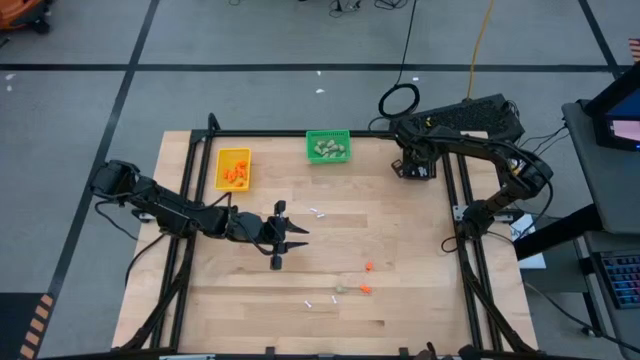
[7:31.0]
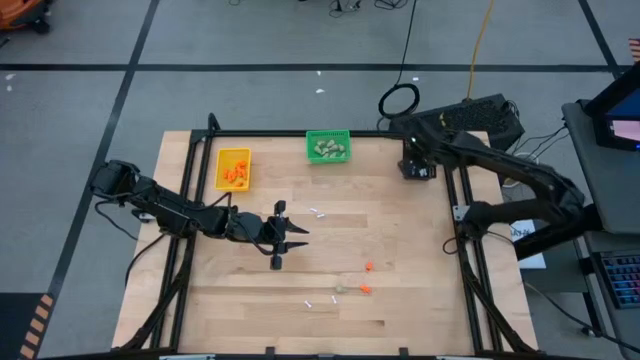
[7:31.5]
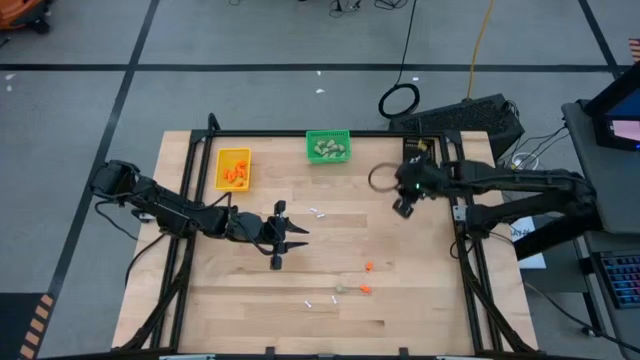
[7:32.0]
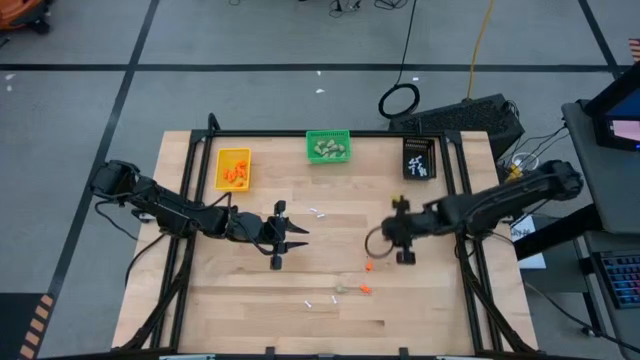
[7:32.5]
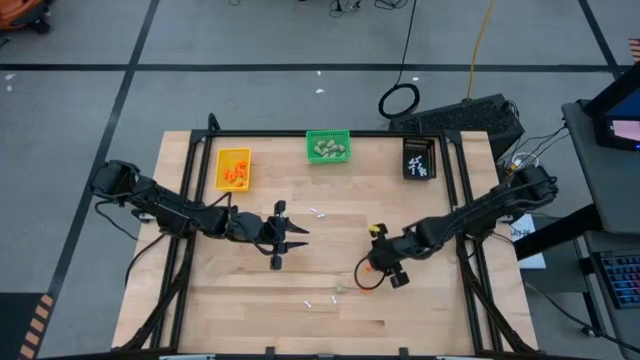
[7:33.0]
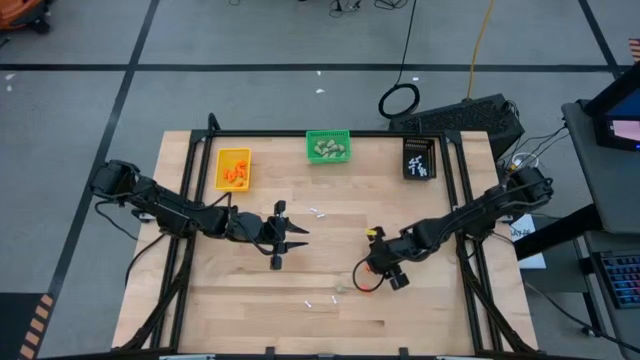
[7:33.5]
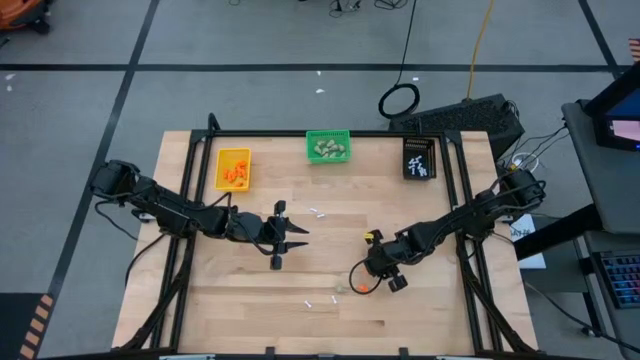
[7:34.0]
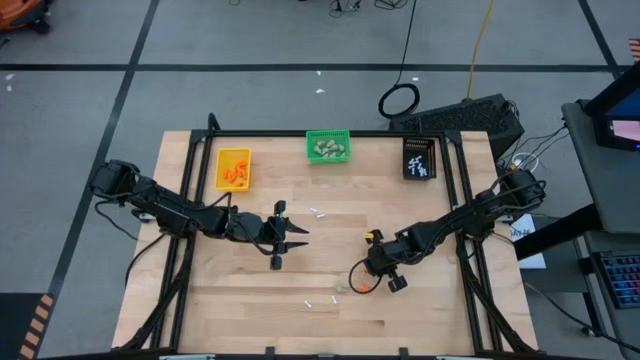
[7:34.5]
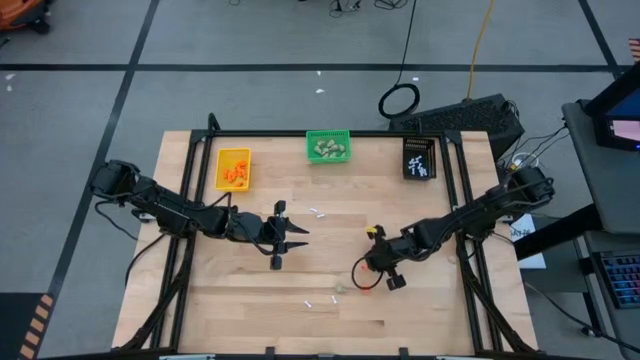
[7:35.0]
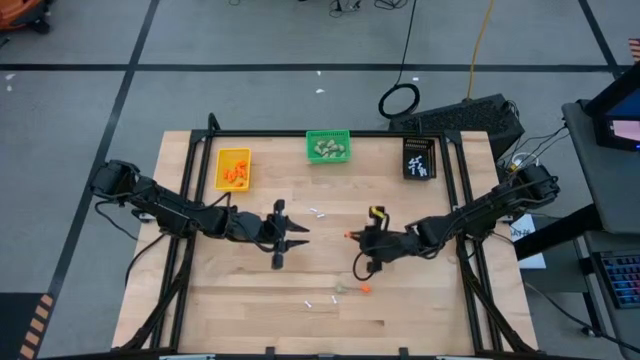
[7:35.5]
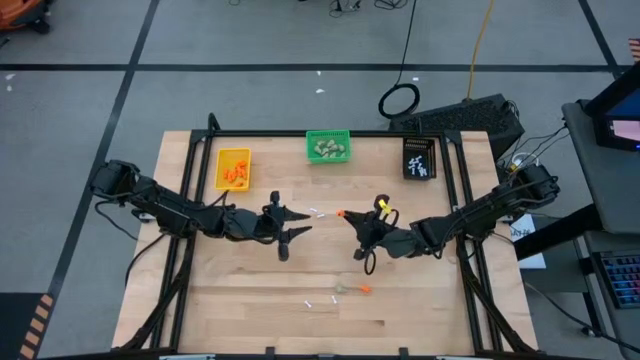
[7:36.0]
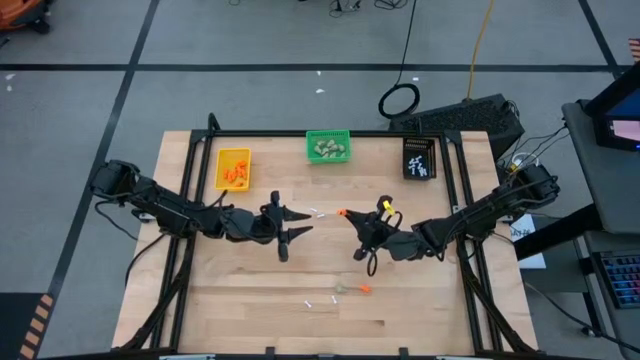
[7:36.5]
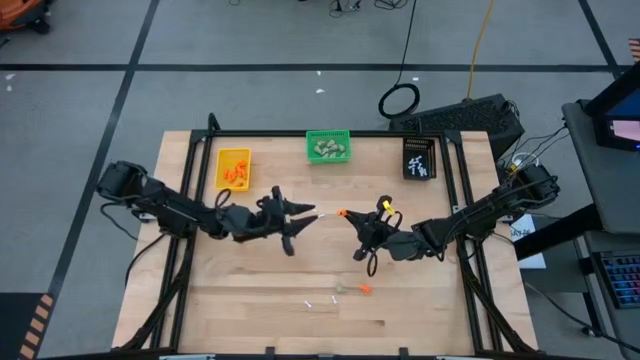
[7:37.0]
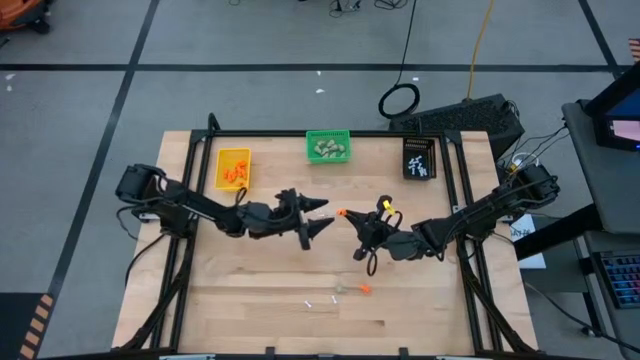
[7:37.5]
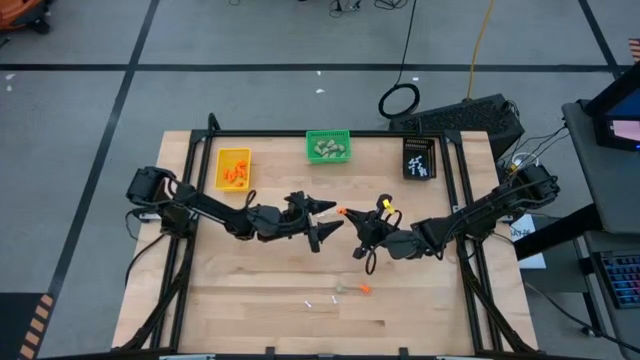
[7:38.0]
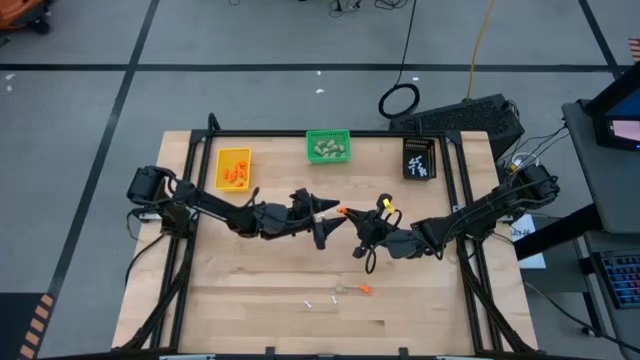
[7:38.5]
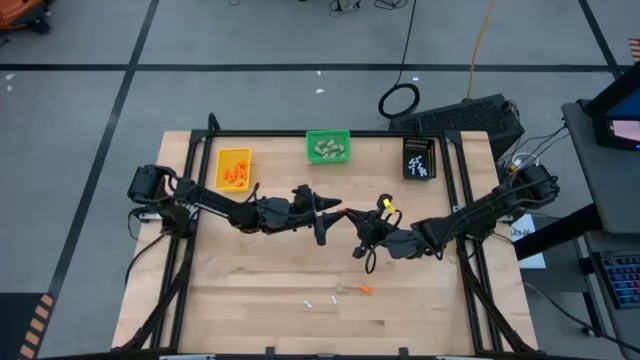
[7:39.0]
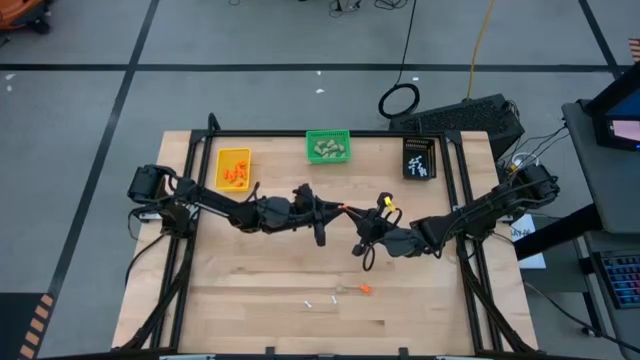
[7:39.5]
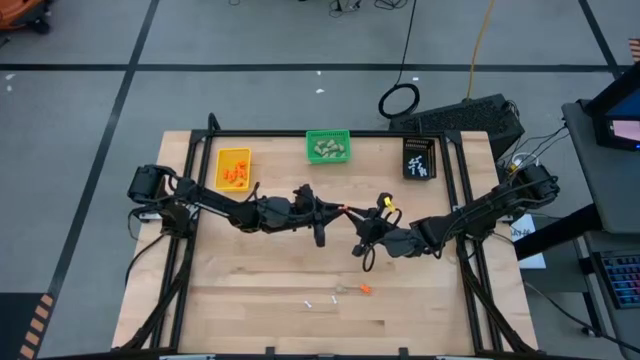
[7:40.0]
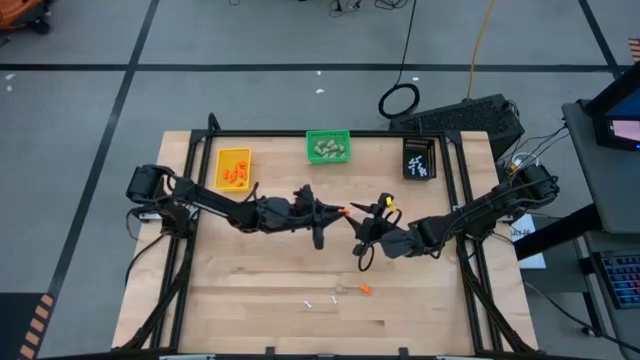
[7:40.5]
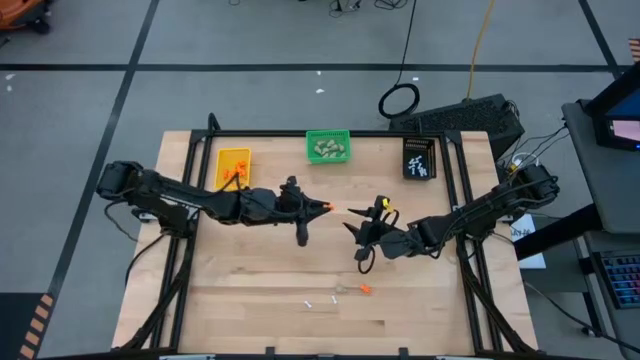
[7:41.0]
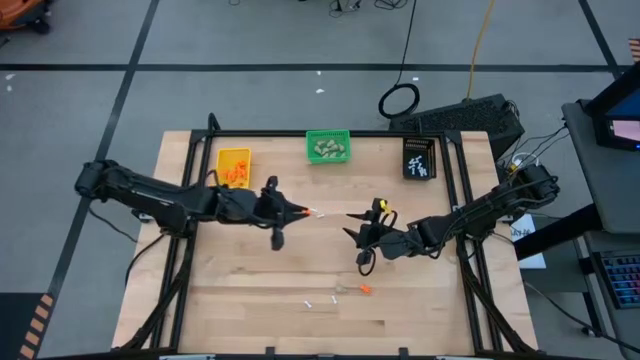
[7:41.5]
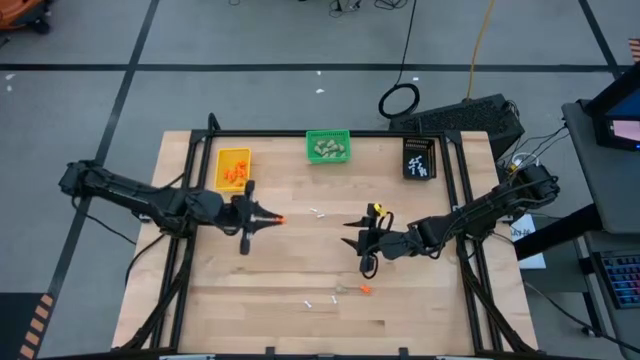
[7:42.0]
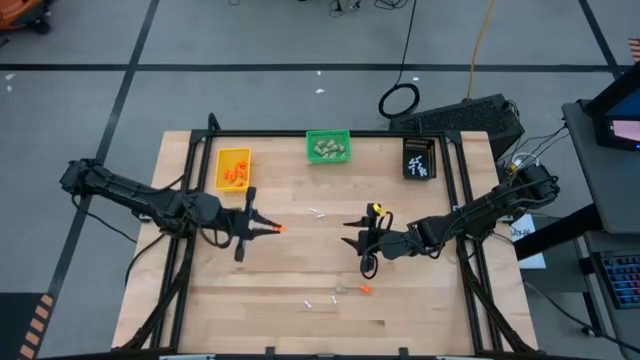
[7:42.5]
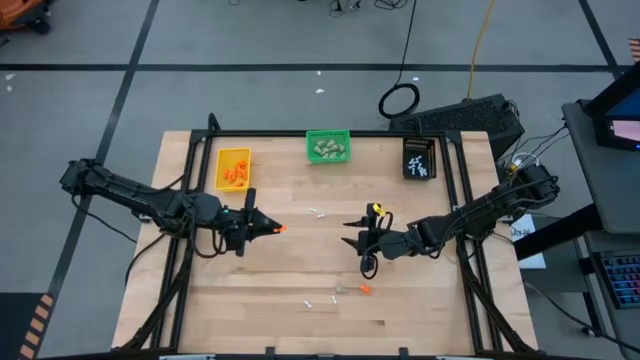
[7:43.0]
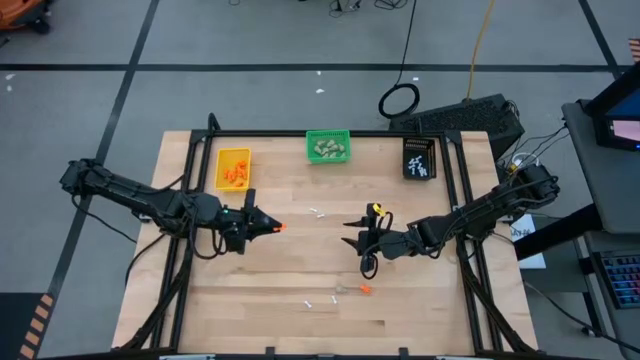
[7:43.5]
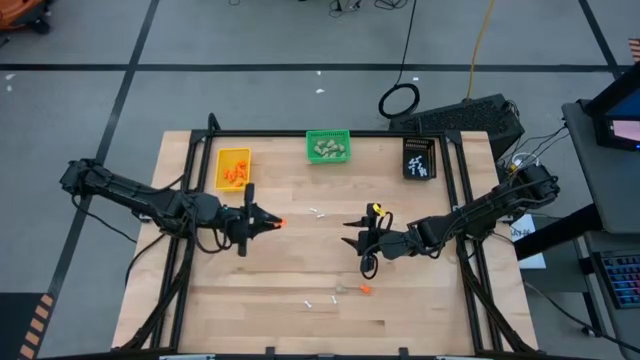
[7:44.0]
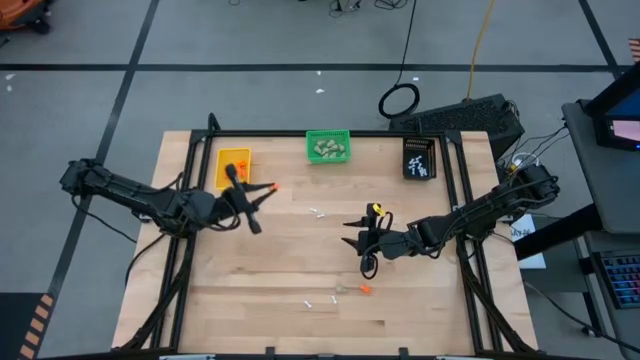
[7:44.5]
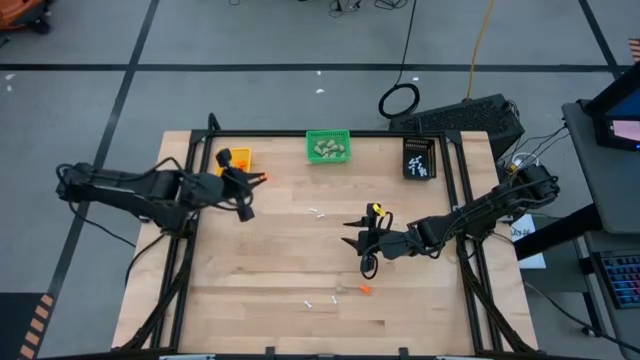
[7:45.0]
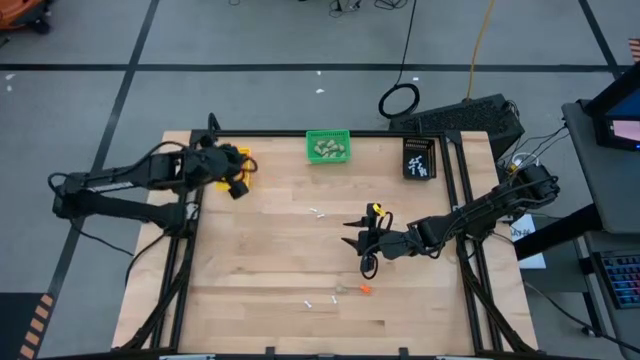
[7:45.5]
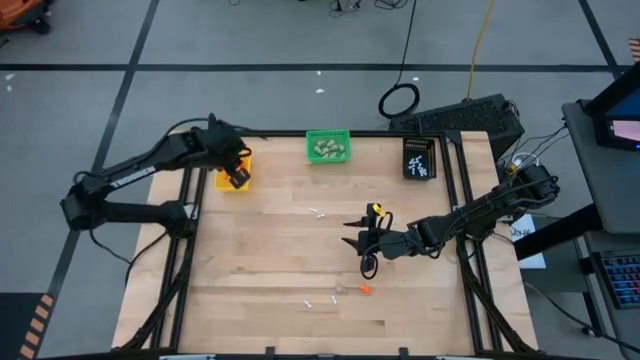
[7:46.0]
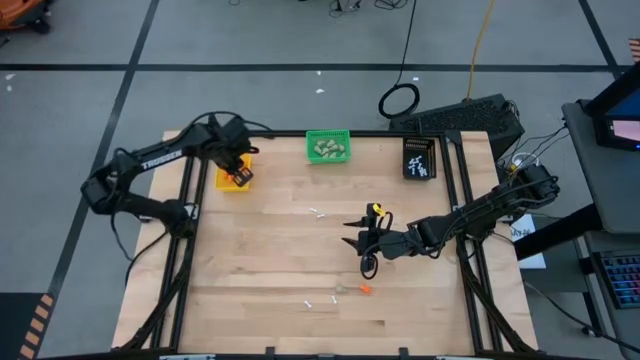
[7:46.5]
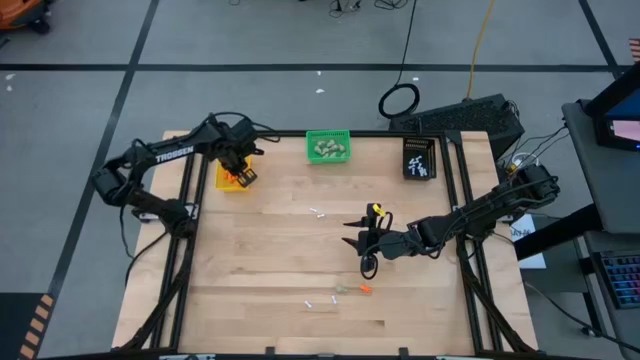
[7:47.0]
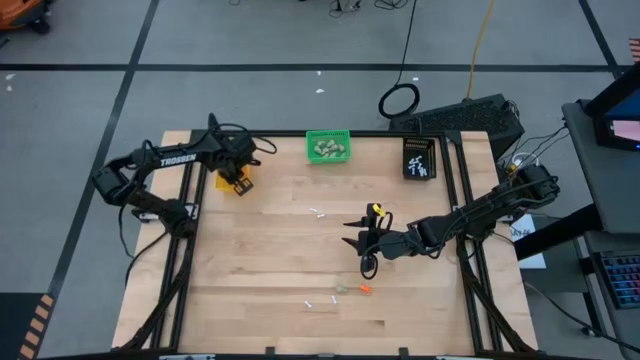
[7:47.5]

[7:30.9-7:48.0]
Task: Sort Halloween decoration
Put the orange skeleton toy into the yellow bin

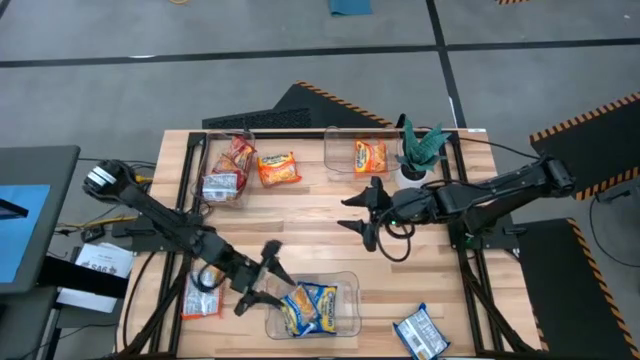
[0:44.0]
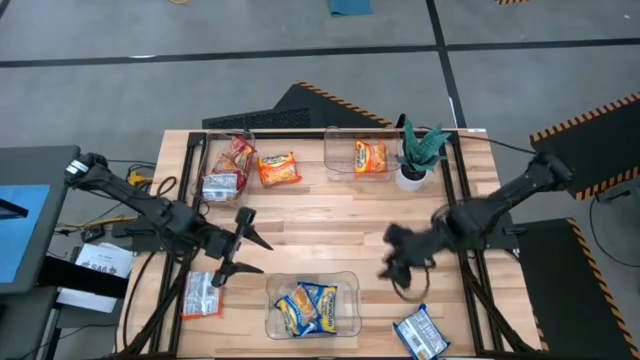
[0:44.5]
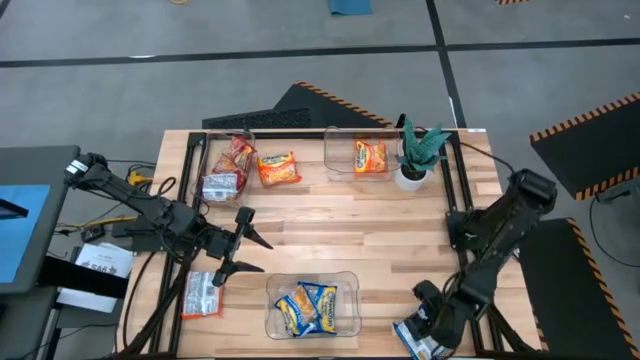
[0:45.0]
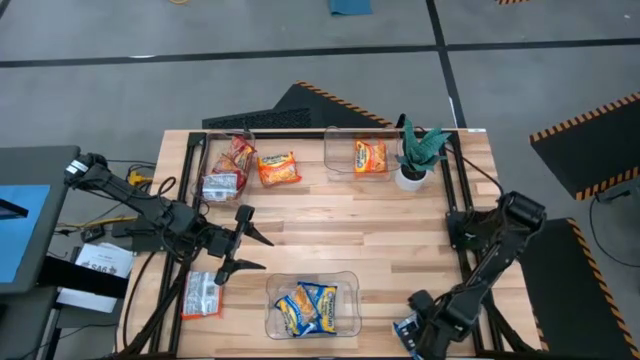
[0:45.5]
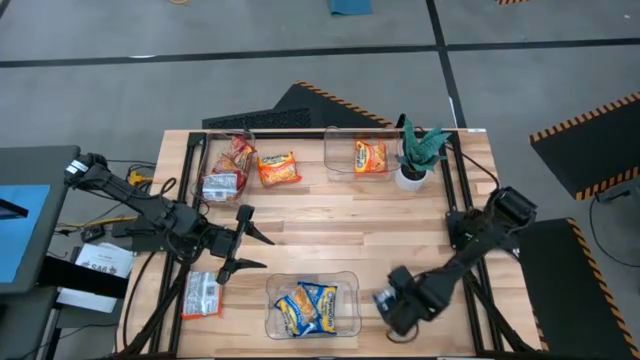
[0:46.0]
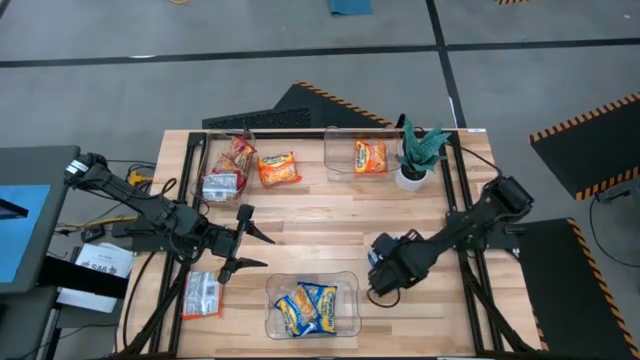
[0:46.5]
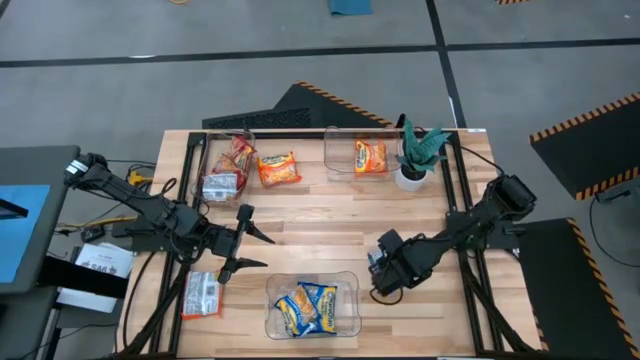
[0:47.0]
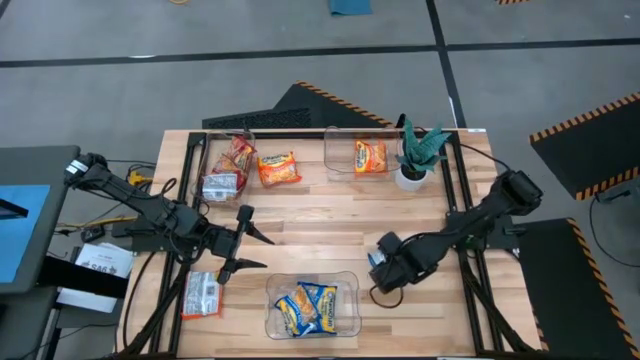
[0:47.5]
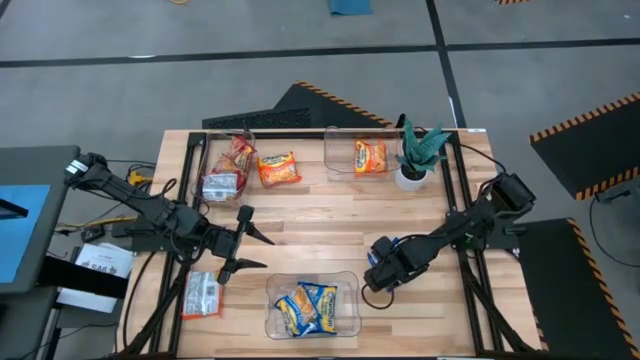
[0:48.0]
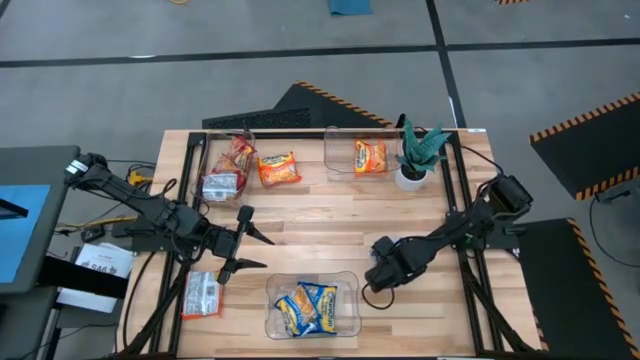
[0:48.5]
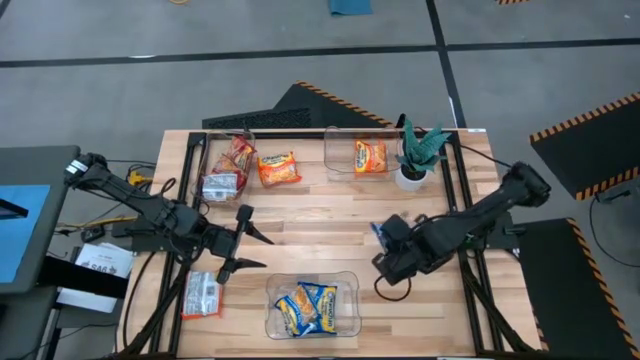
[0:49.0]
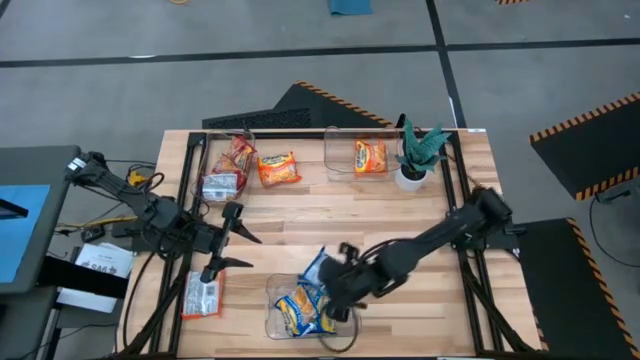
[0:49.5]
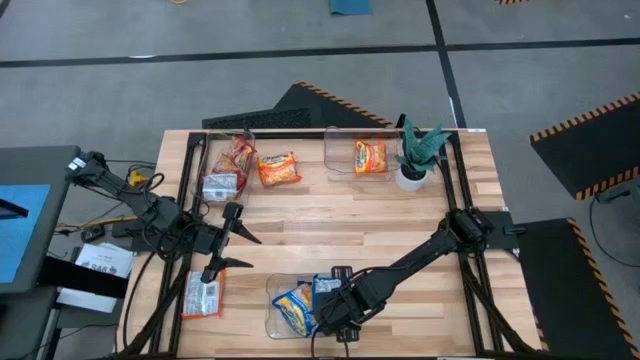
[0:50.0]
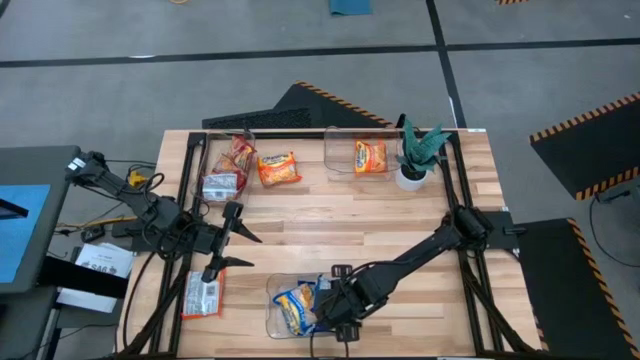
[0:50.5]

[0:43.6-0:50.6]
Task: Sort Maruchan noodles
Put the blue noodle pack into the bottom transparent bin
